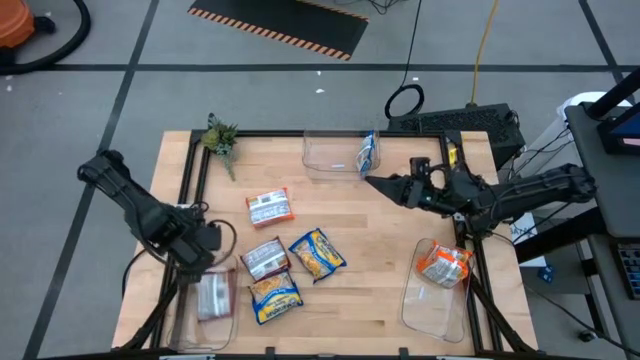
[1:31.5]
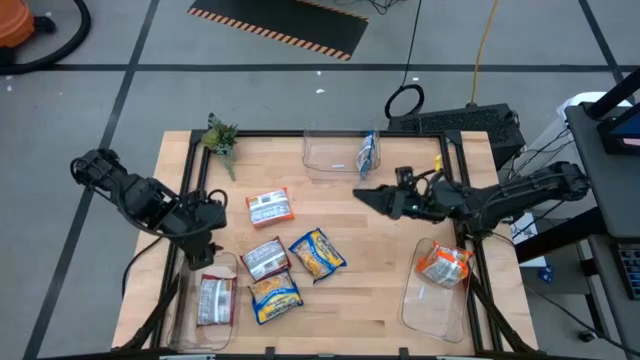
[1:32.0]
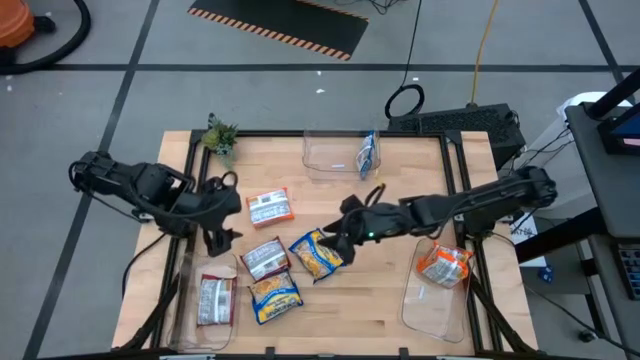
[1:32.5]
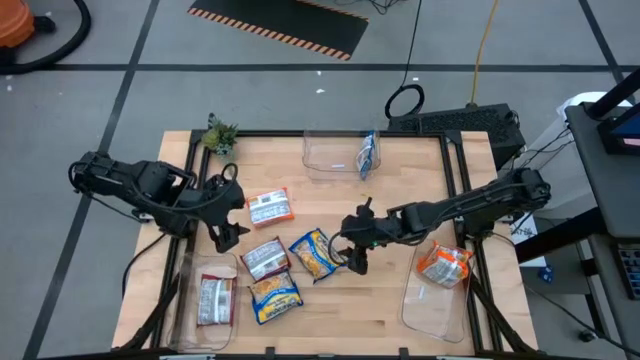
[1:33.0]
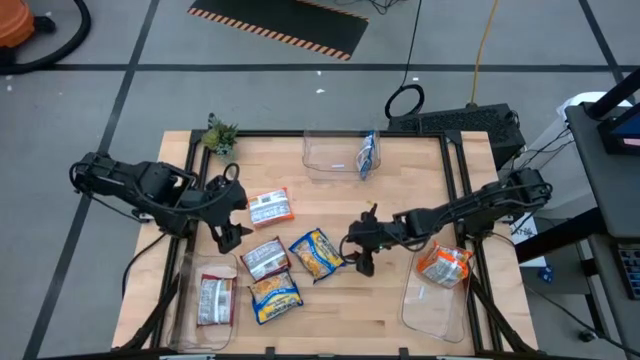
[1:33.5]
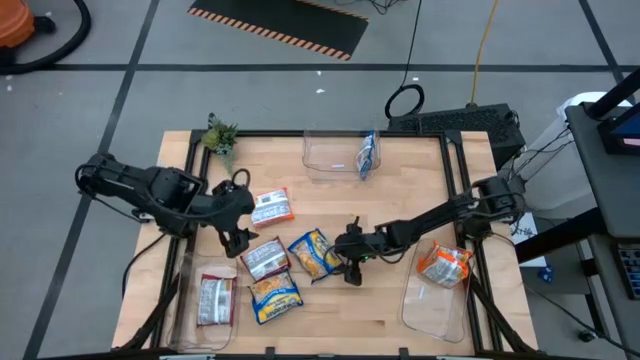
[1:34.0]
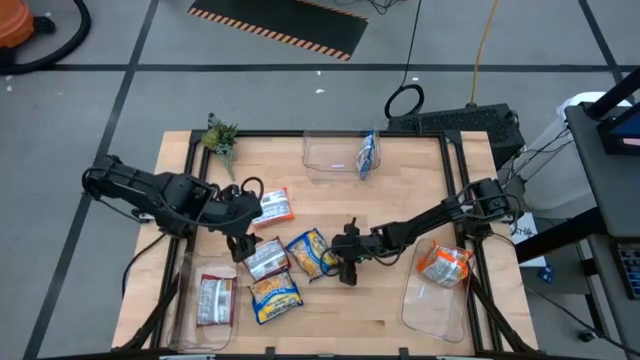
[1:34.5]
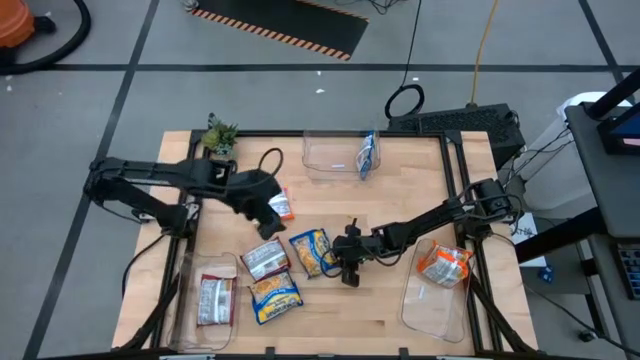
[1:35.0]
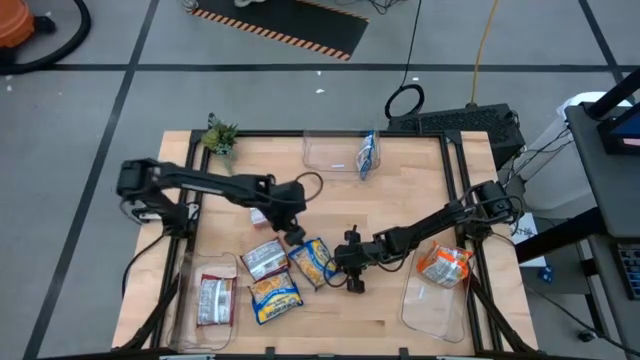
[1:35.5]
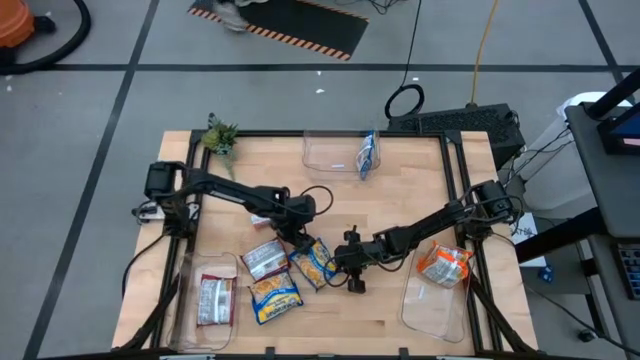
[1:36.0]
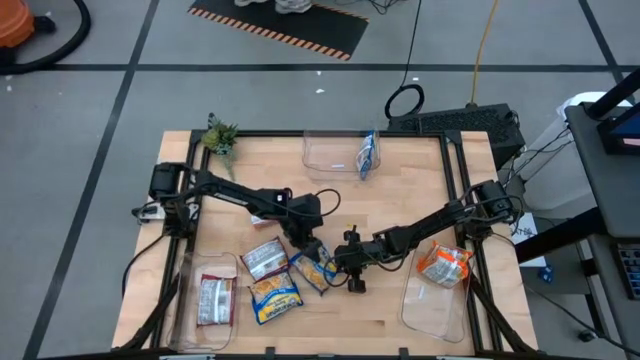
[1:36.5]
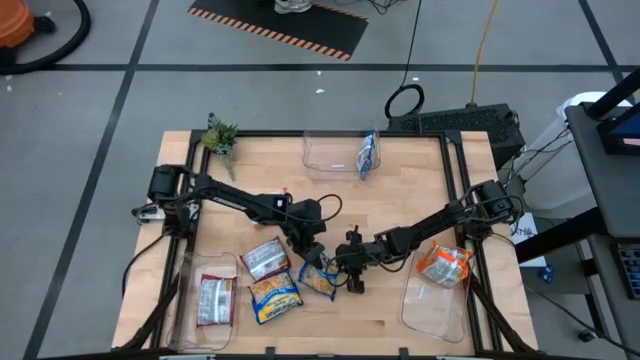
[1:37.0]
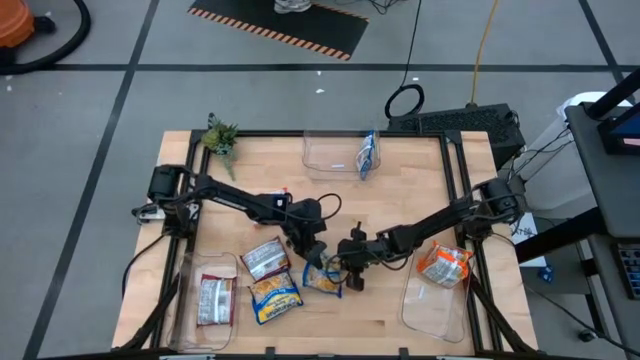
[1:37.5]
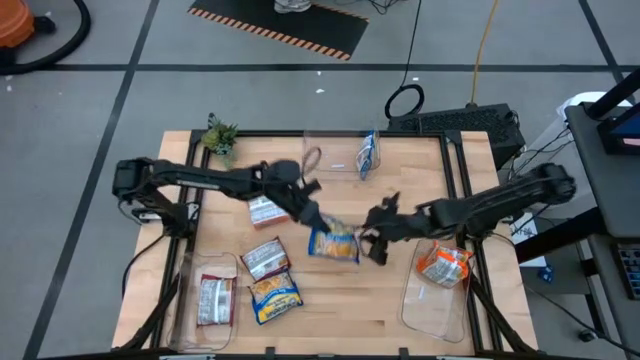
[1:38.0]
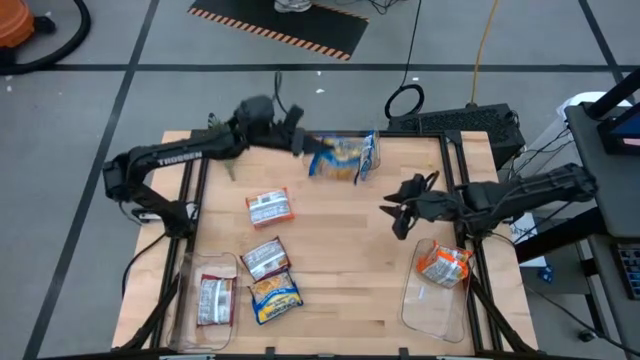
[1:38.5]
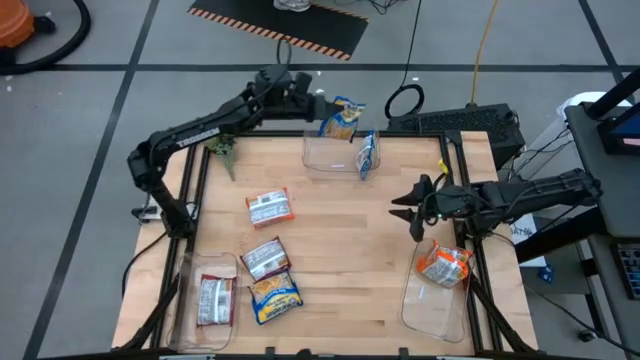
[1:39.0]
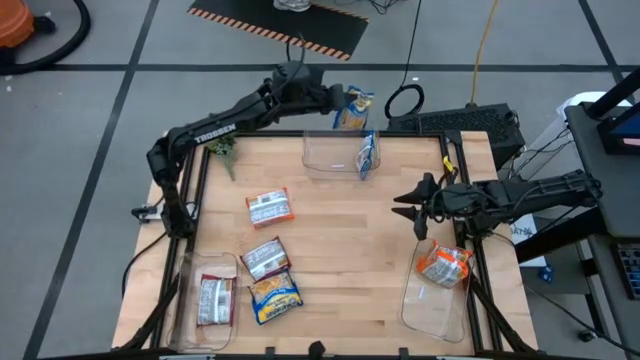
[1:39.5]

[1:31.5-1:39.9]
Task: Sort Maruchan noodles
Put the right blue noodle pack into the top transparent bin

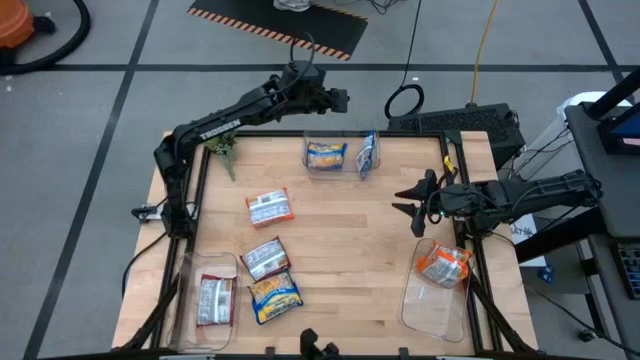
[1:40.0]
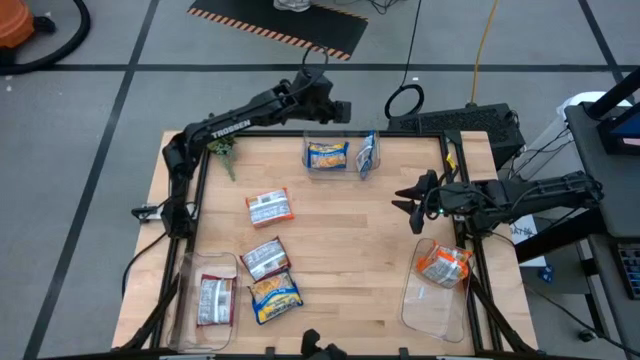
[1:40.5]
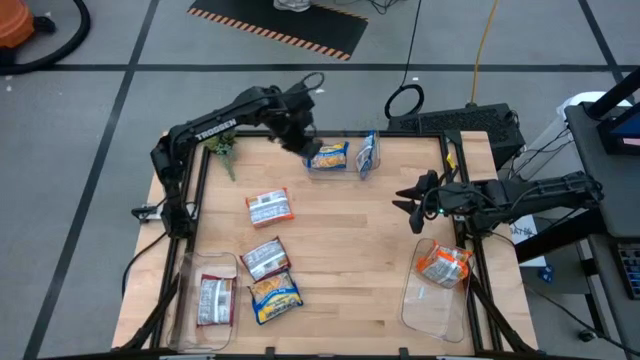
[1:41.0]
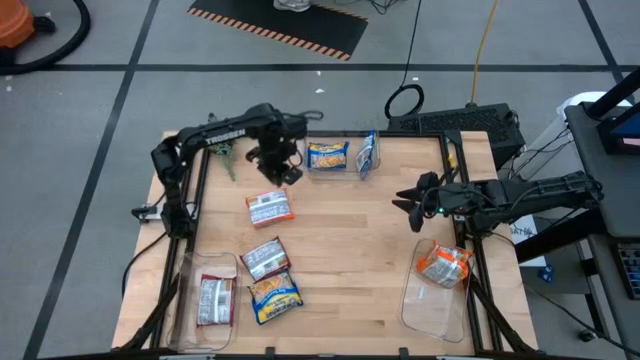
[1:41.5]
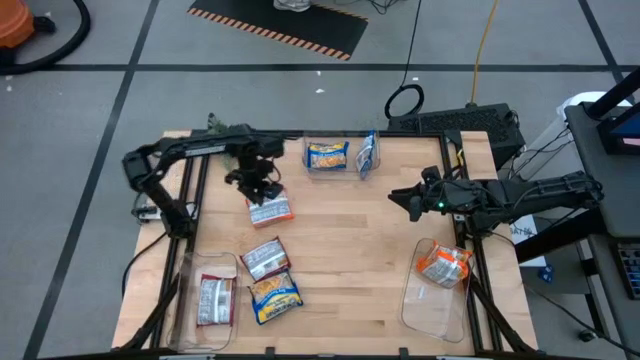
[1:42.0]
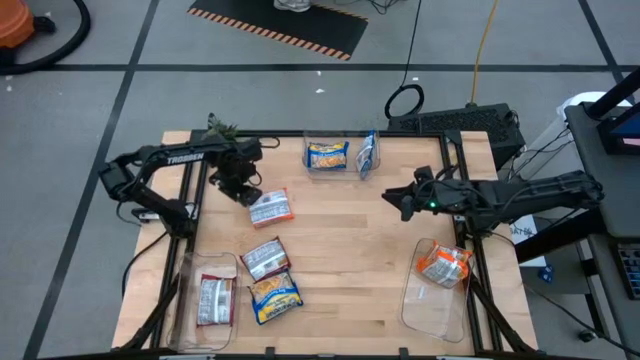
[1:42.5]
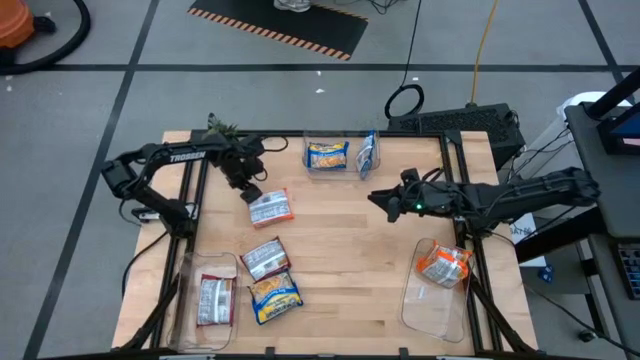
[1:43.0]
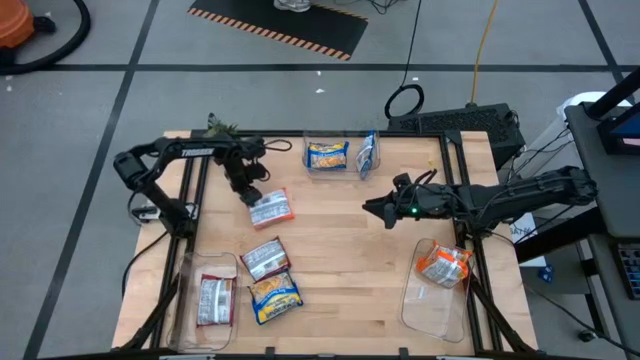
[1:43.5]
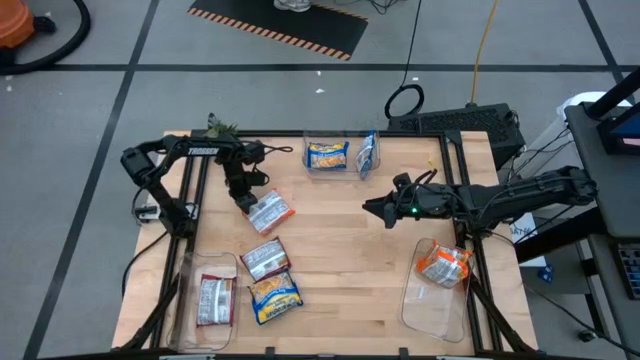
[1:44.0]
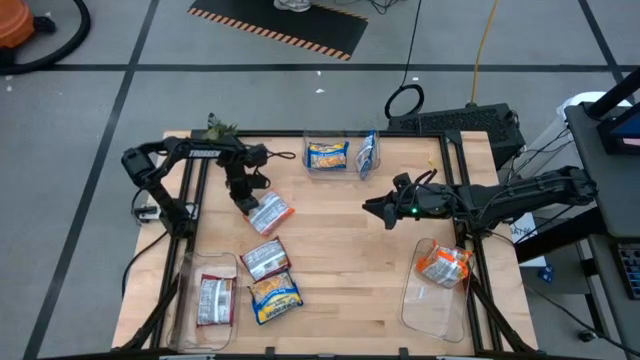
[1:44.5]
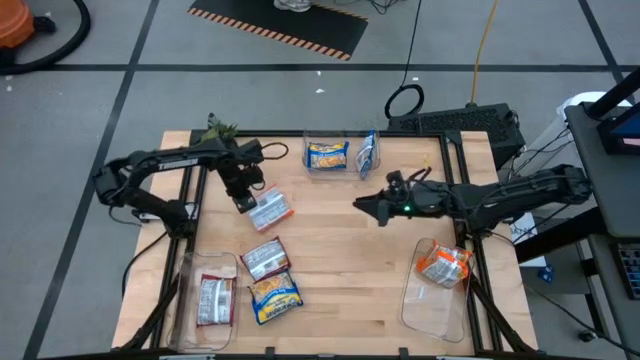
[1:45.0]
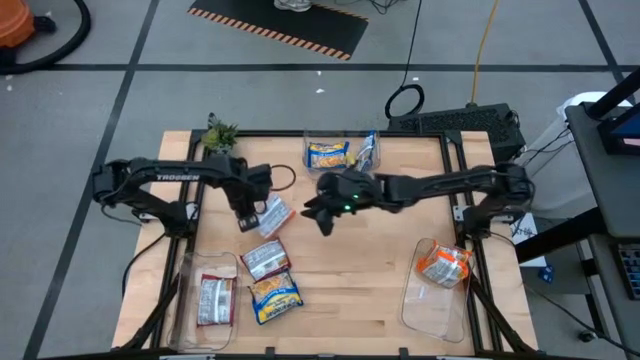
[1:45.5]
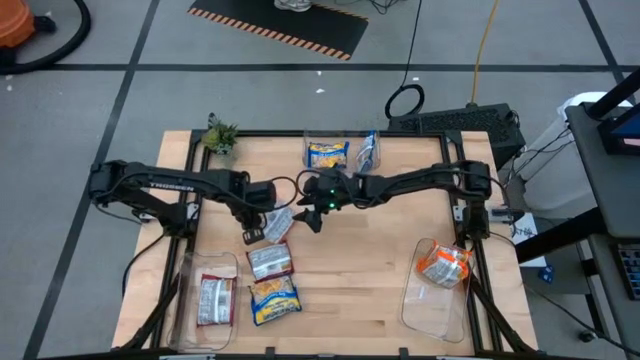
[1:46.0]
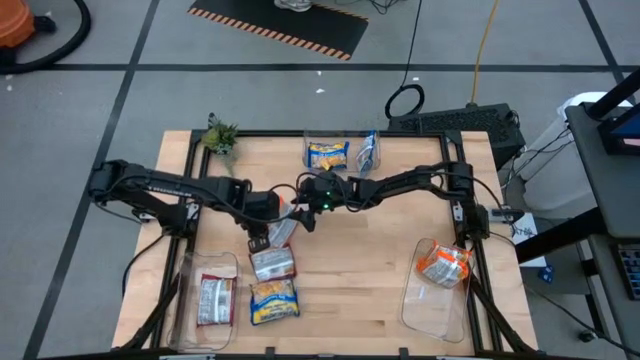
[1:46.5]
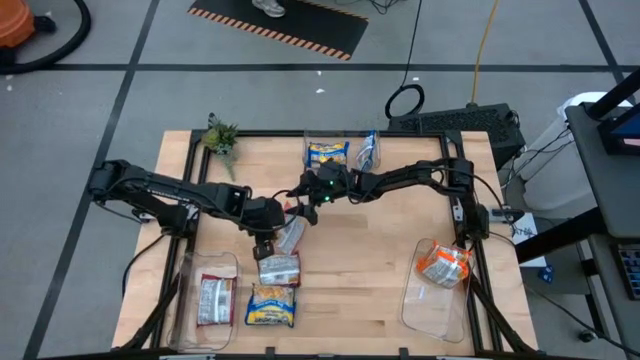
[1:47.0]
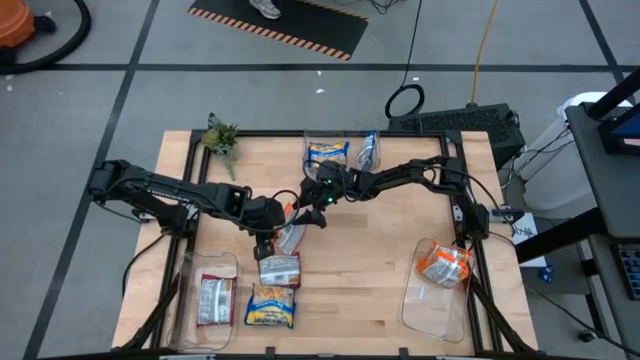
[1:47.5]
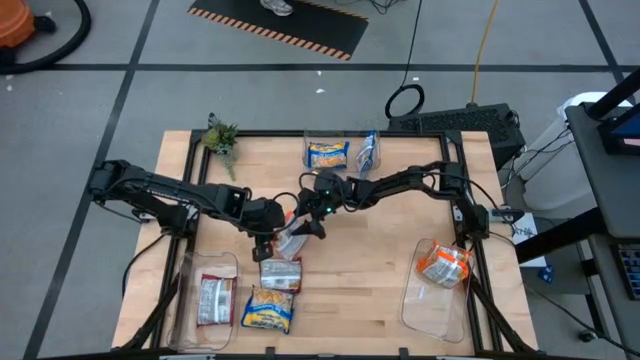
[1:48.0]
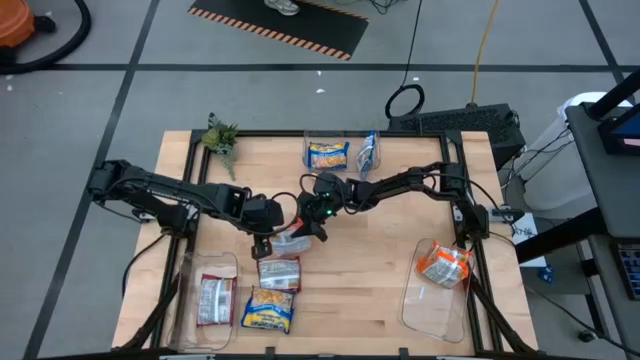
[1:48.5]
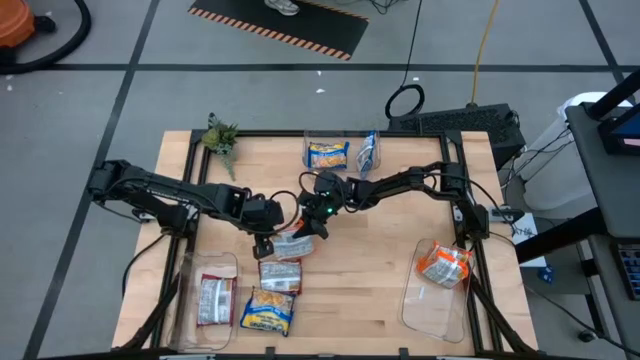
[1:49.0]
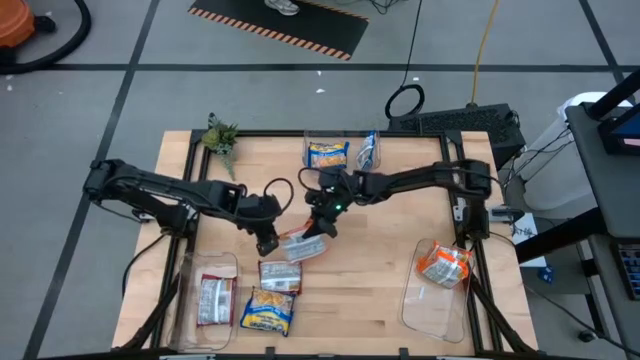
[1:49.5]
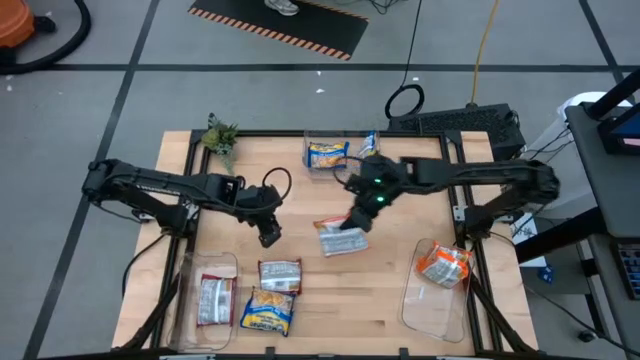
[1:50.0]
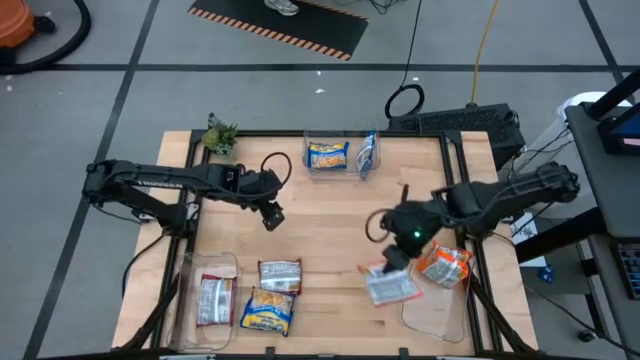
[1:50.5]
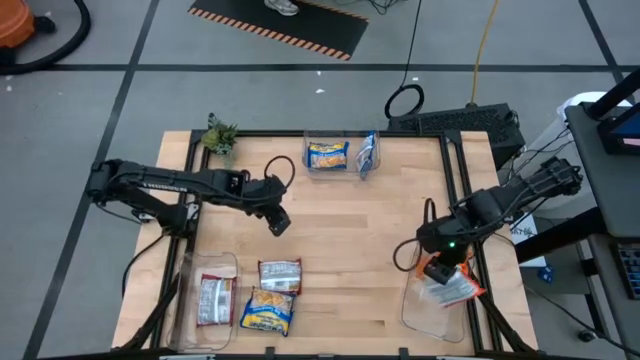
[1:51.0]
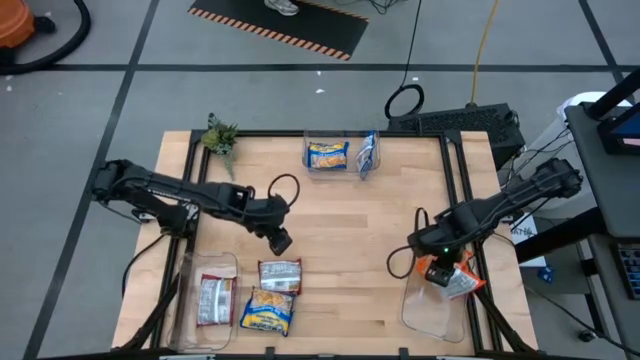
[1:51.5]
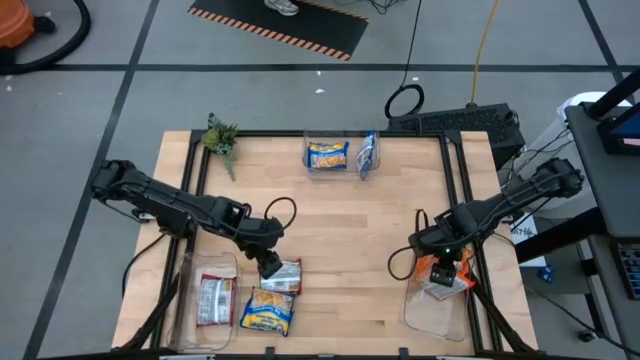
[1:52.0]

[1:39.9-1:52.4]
Put the orange noodle pack into the bottom right transparent bin
